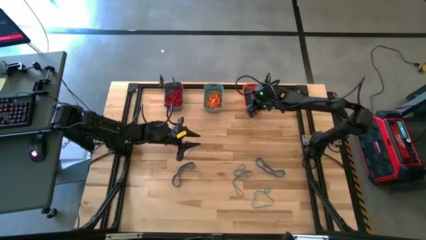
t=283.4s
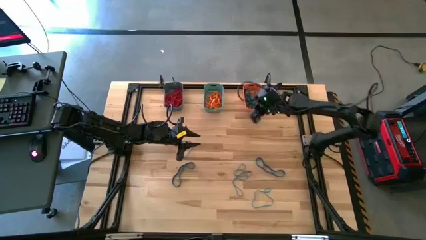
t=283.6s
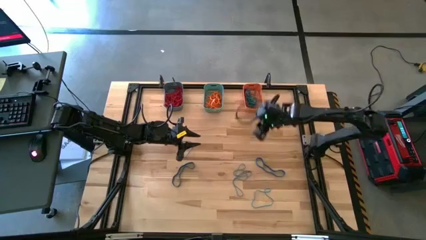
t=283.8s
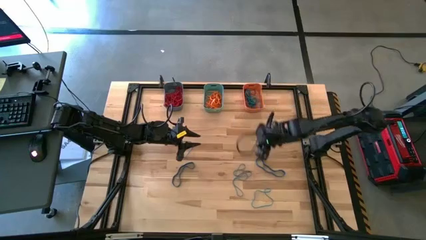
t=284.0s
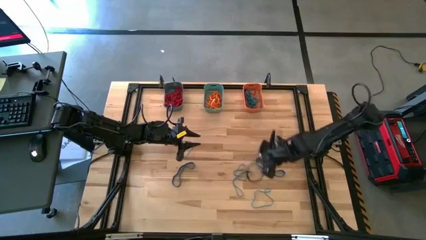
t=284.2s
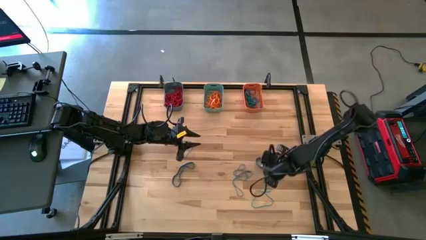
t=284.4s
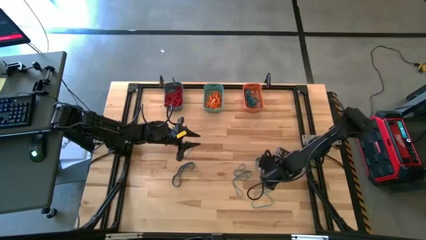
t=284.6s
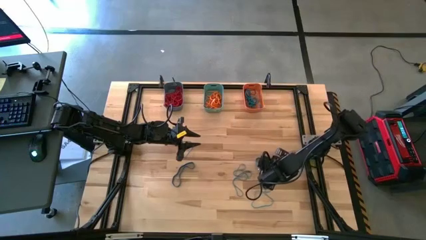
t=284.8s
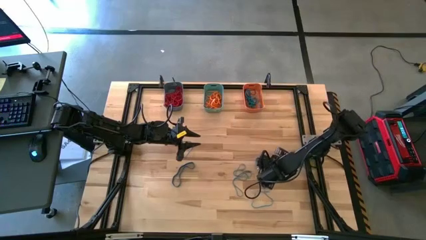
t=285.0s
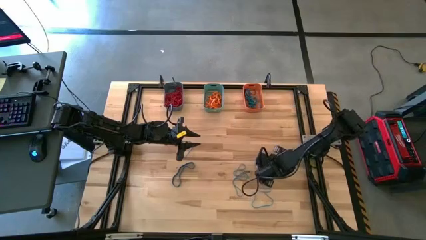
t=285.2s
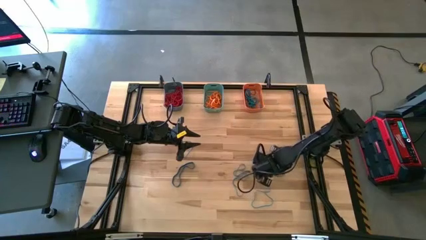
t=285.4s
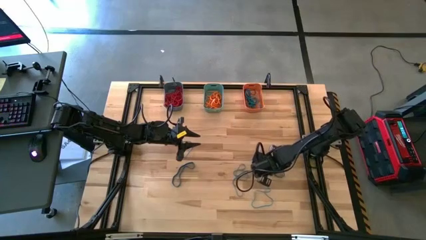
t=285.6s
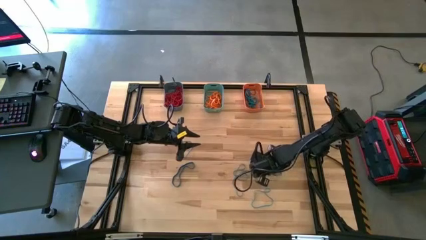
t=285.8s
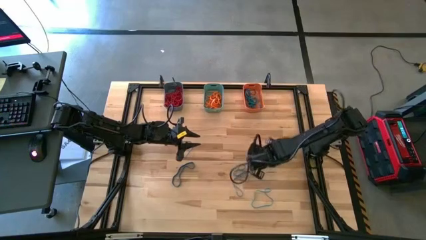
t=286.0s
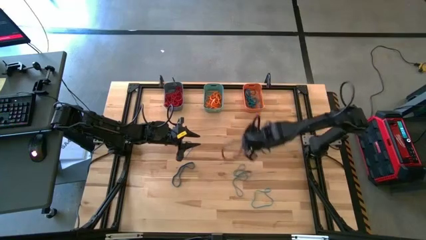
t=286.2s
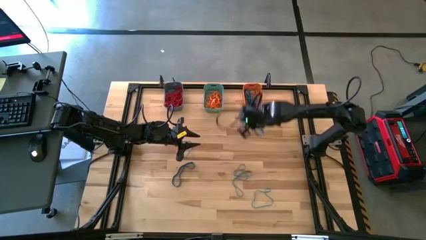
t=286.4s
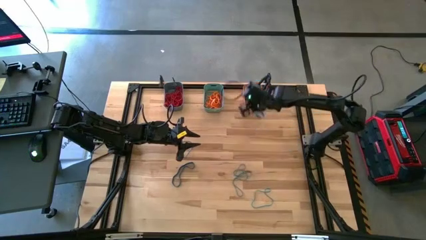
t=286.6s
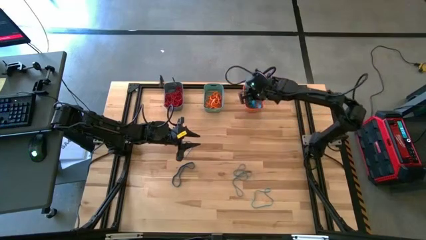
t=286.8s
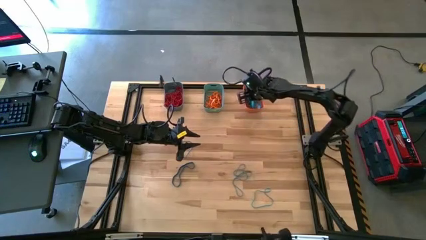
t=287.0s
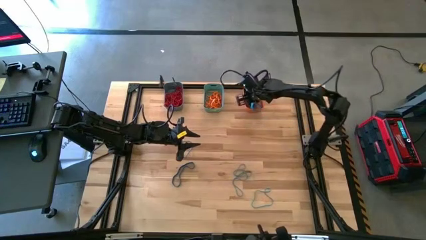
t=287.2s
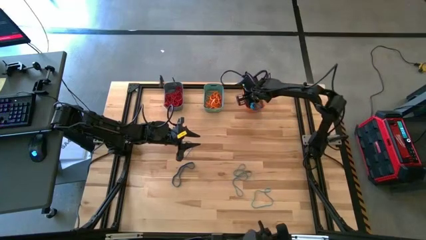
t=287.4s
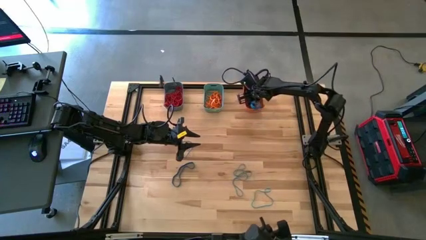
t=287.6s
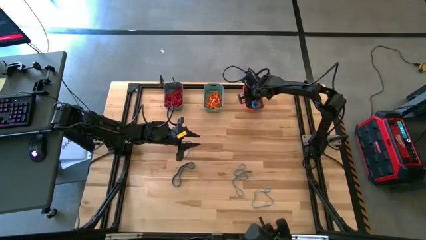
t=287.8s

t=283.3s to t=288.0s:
Task: Sort rubber bands into baskets
Put the blue rubber band into the orange bin

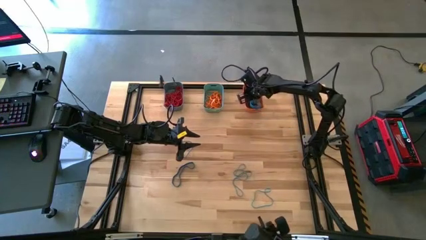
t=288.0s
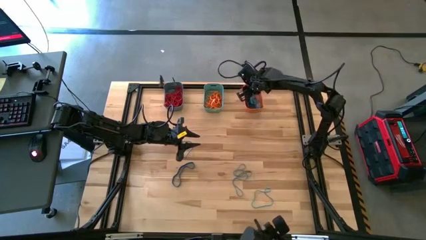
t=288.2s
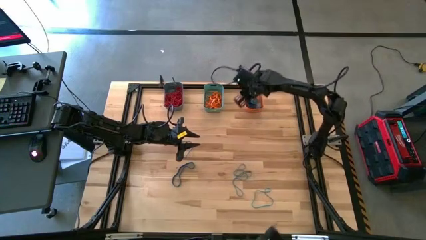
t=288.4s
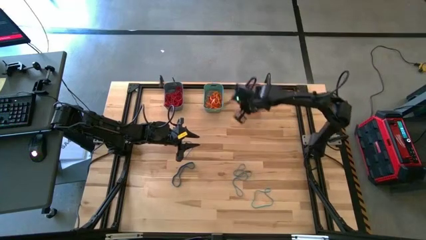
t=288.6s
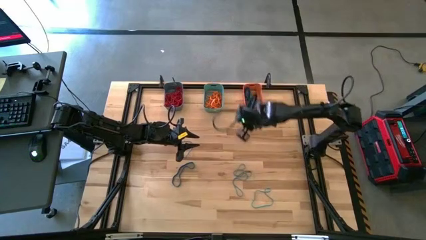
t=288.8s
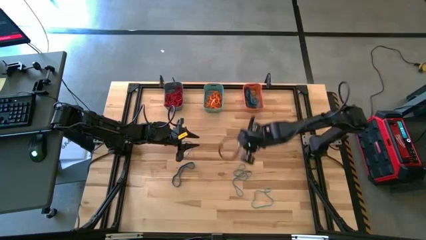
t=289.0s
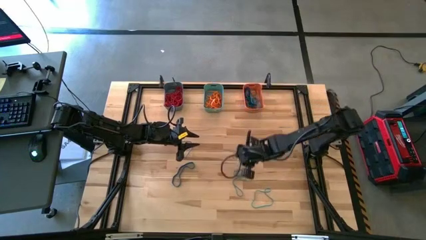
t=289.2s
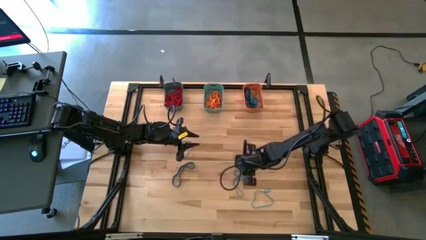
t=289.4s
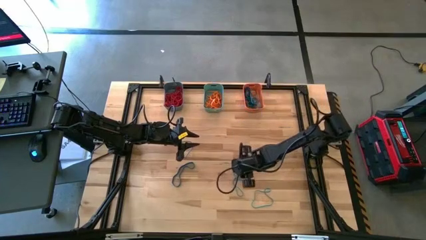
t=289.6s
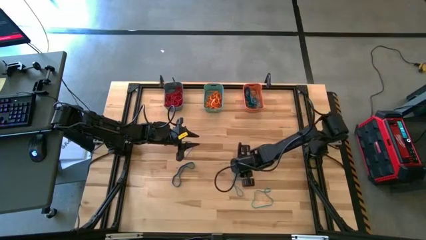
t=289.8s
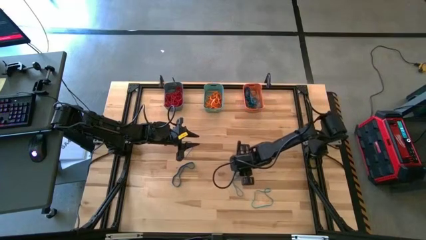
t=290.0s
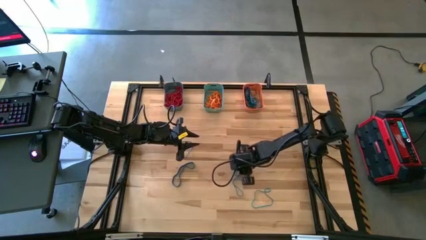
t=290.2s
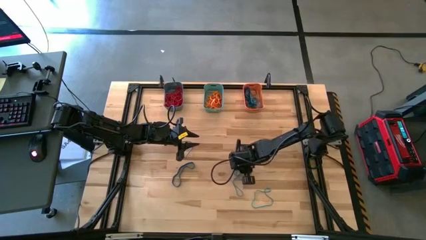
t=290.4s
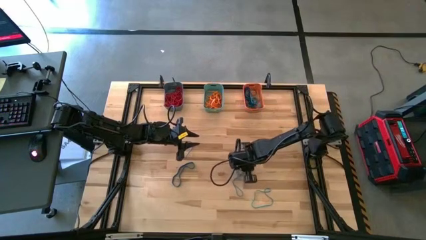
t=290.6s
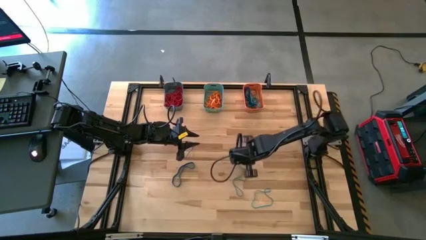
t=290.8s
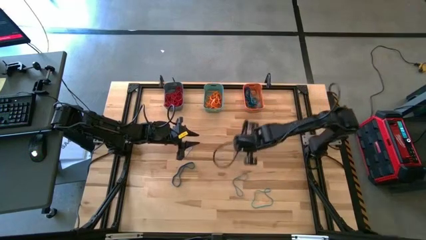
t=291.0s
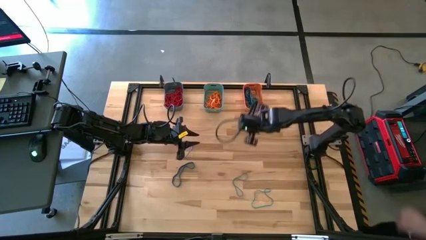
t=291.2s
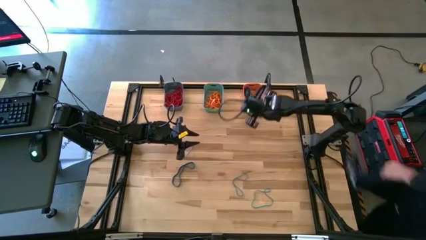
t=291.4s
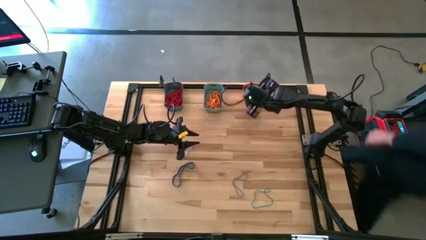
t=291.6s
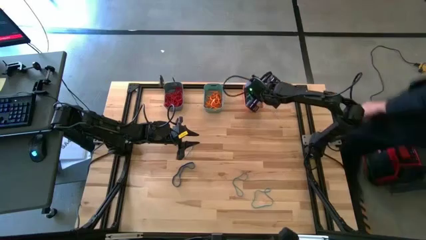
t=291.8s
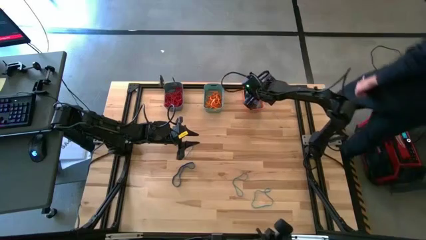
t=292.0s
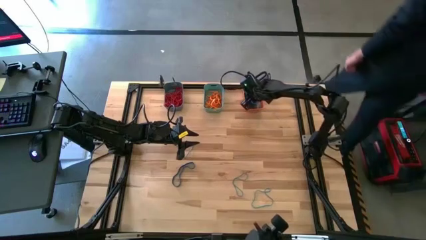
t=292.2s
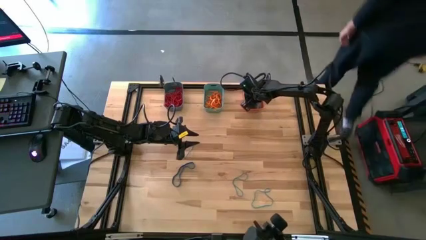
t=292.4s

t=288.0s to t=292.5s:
Put the blue rubber band into the orange bin

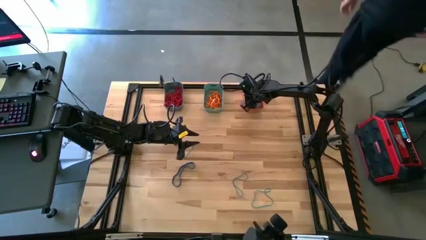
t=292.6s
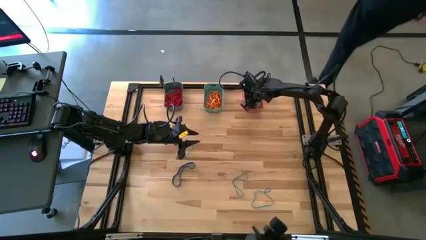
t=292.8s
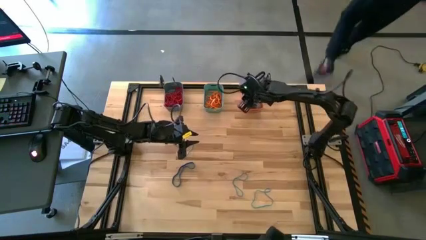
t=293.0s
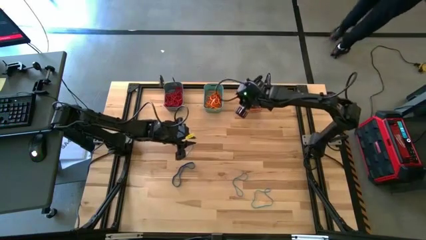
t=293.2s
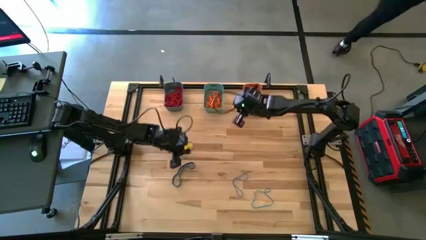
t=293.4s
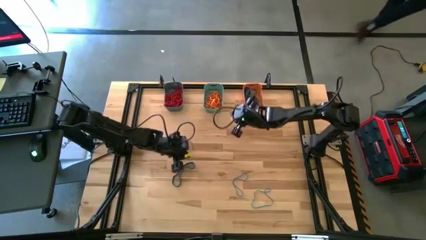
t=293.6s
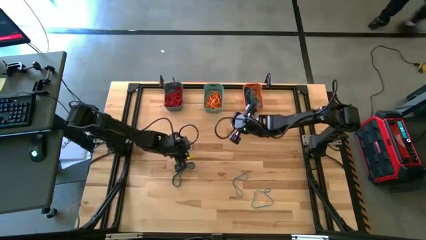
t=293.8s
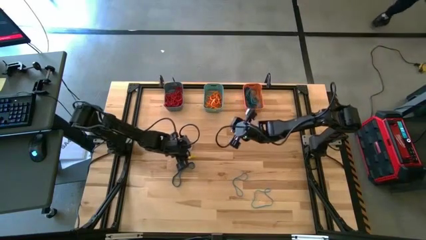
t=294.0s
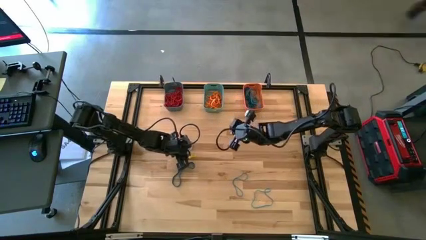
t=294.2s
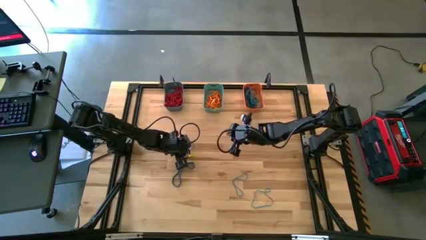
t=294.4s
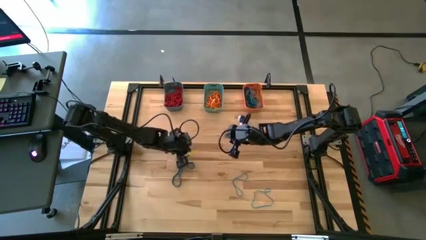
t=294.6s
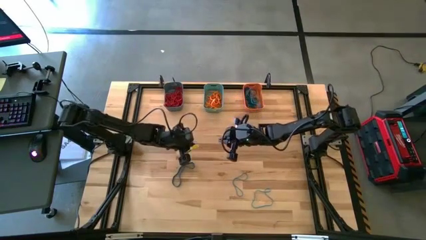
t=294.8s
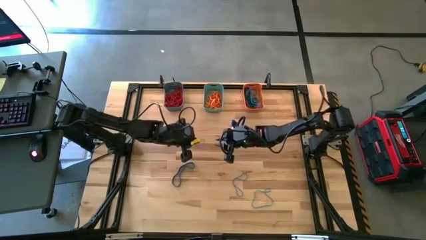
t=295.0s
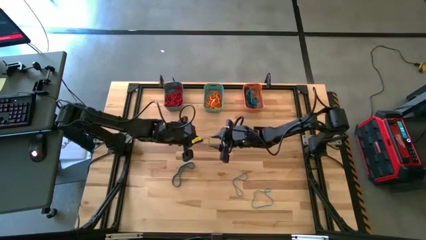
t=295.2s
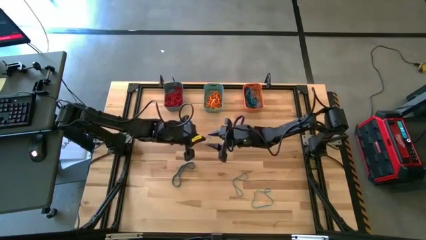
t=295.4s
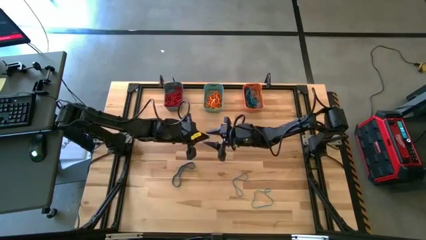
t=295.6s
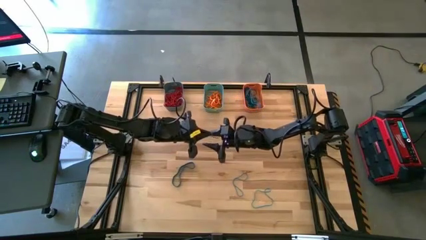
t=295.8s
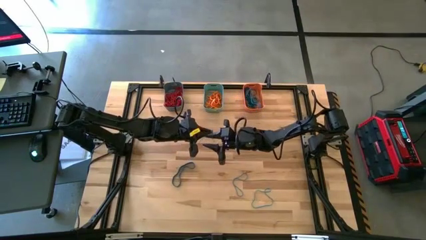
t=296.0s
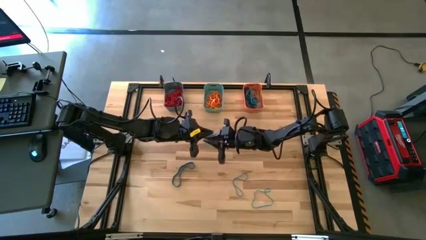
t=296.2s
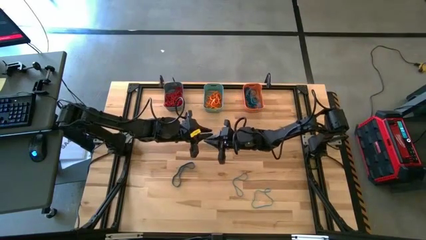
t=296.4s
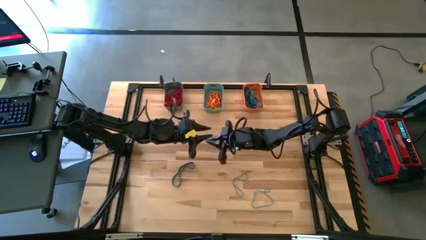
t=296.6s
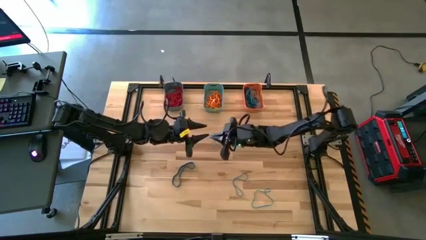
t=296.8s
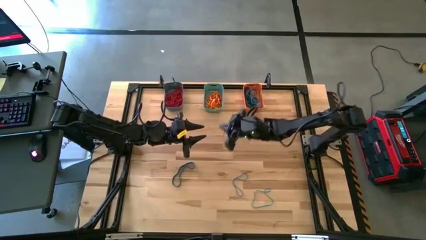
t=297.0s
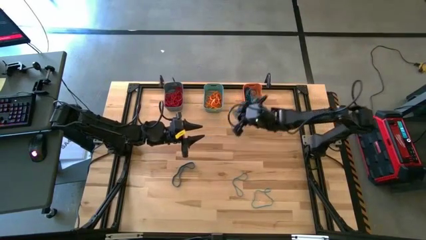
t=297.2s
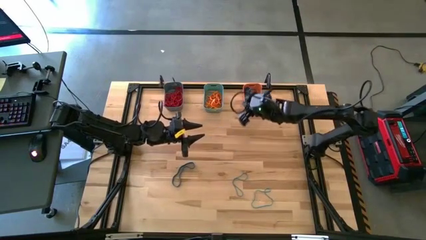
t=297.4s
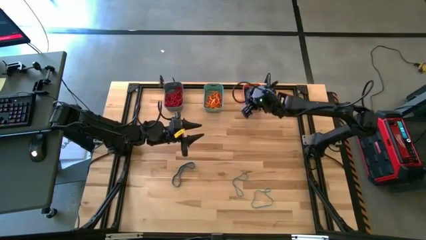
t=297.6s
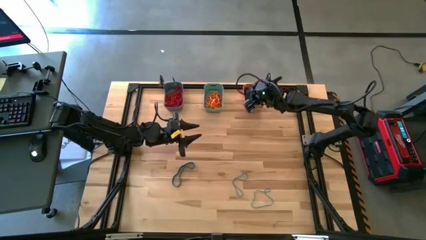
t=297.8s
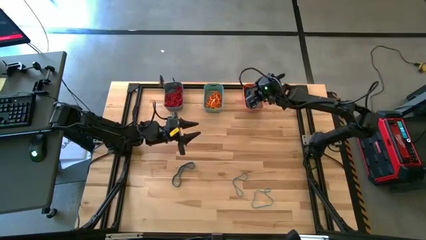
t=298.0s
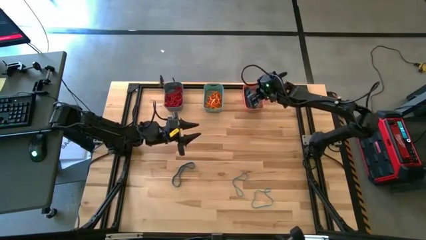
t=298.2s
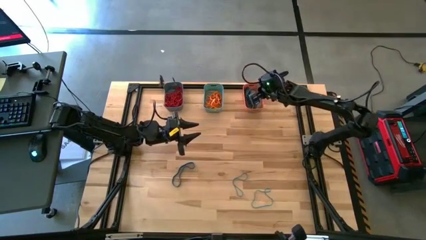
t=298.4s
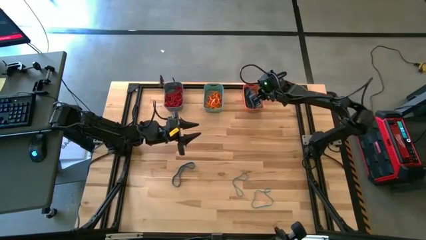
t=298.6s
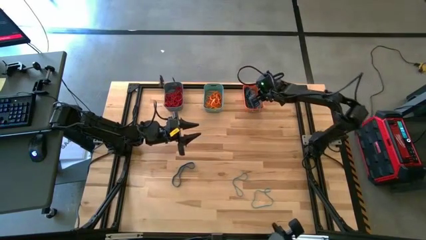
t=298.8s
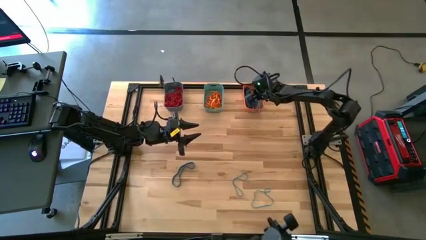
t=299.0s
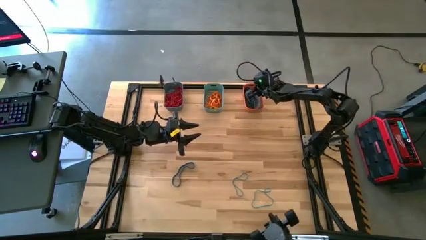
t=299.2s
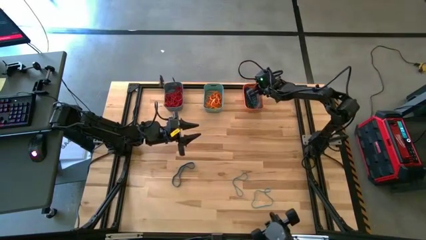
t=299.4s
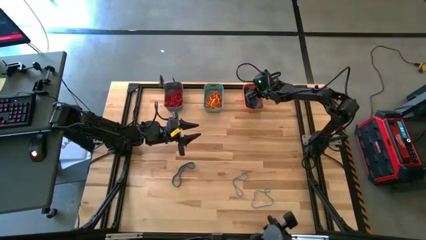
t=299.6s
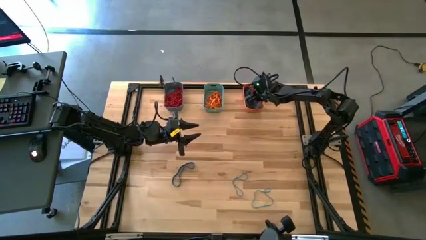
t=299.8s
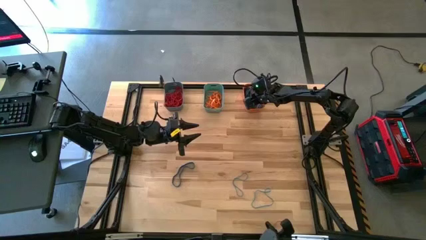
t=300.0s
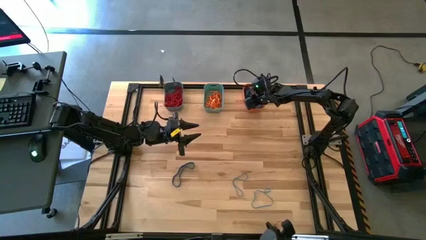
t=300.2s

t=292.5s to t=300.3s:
Put the blue rubber band into the orange bin
